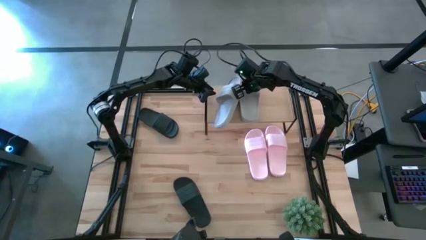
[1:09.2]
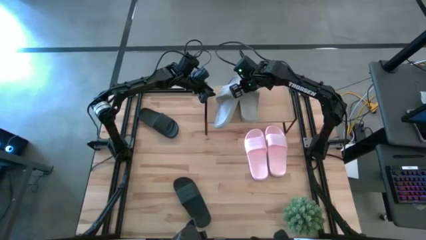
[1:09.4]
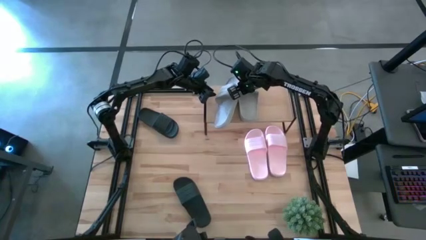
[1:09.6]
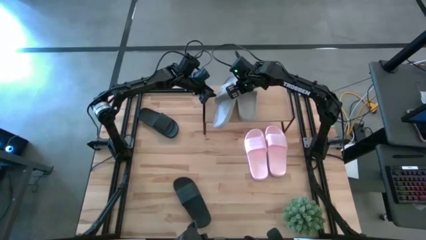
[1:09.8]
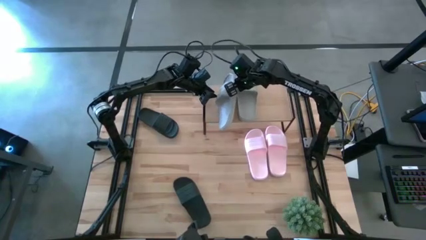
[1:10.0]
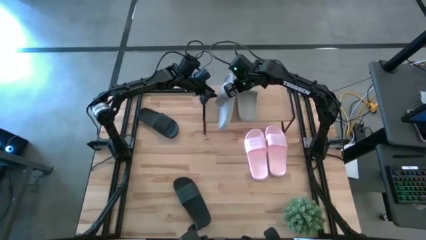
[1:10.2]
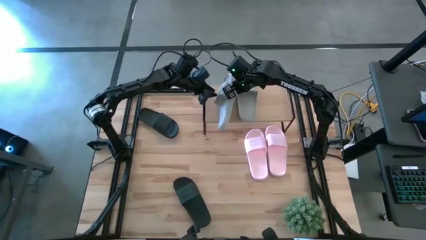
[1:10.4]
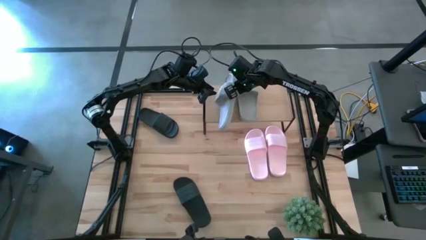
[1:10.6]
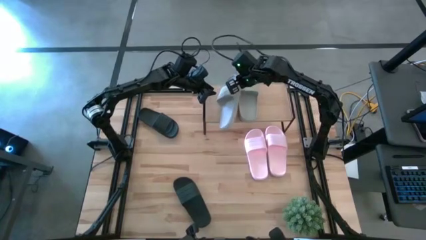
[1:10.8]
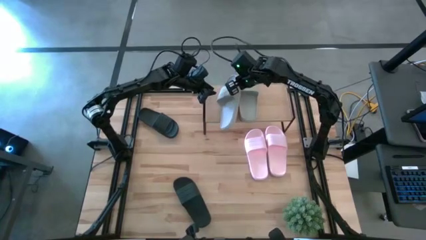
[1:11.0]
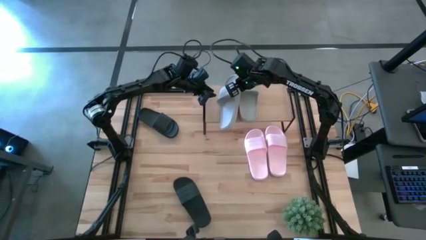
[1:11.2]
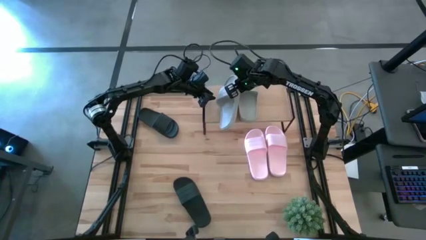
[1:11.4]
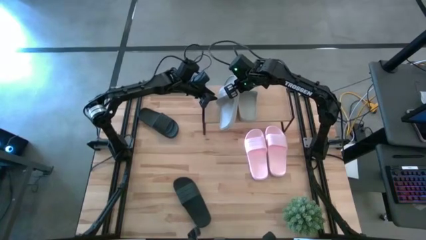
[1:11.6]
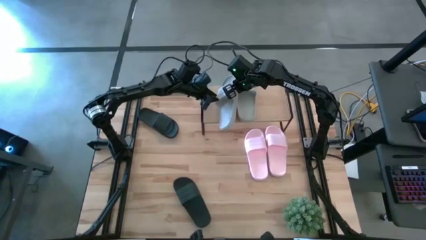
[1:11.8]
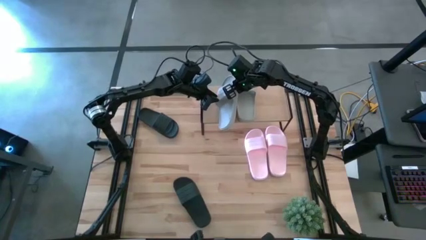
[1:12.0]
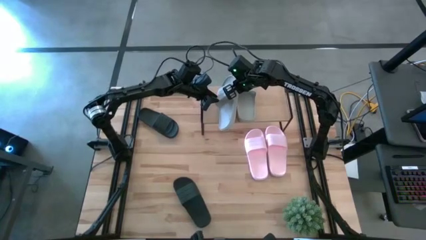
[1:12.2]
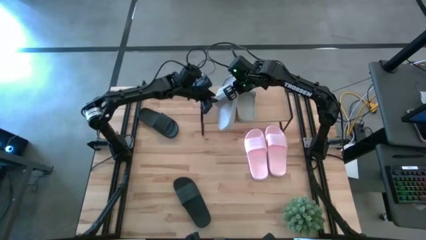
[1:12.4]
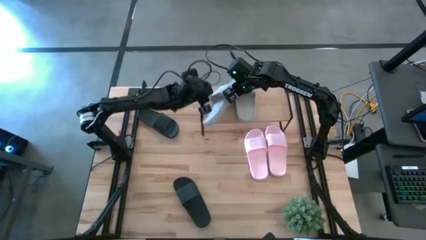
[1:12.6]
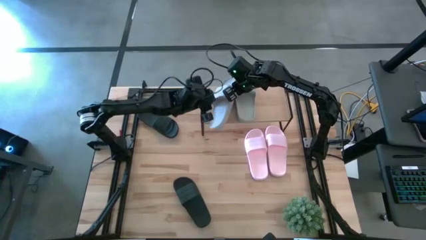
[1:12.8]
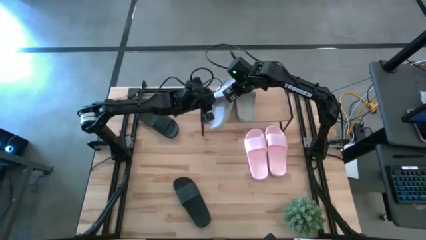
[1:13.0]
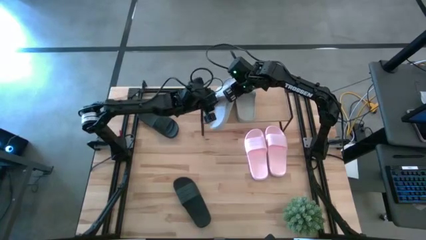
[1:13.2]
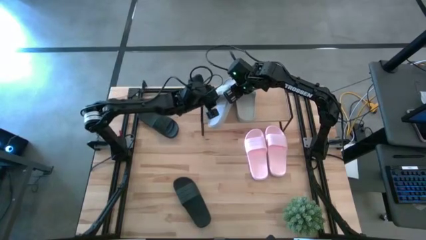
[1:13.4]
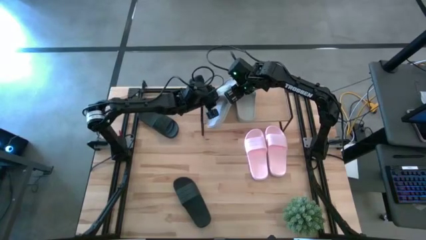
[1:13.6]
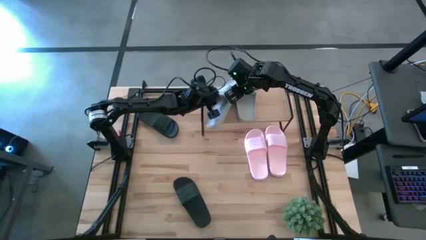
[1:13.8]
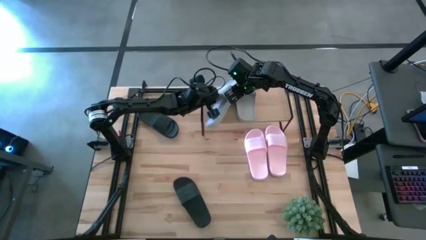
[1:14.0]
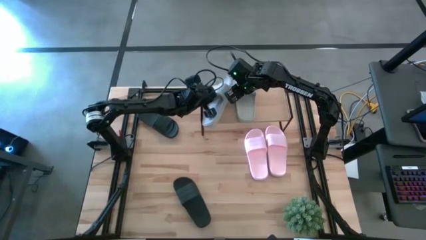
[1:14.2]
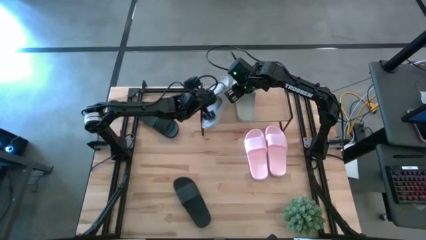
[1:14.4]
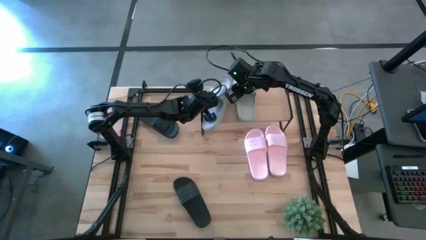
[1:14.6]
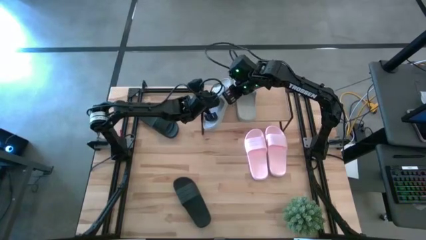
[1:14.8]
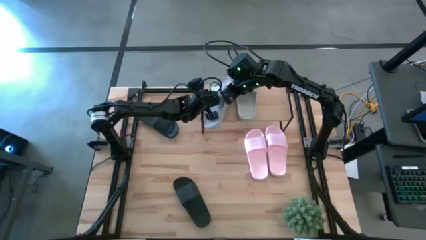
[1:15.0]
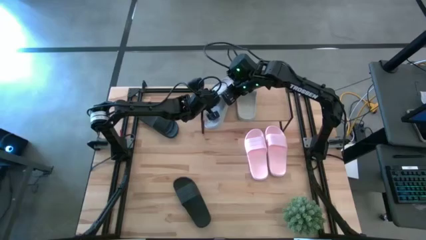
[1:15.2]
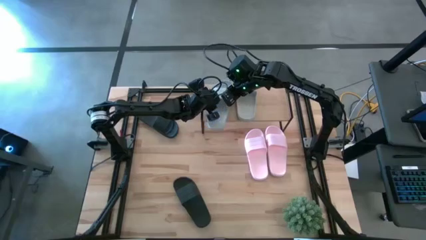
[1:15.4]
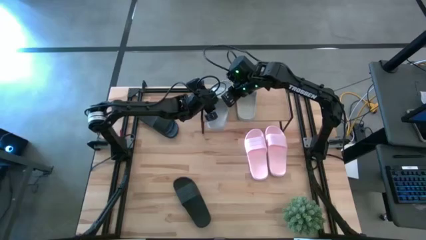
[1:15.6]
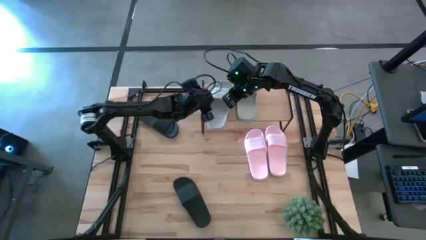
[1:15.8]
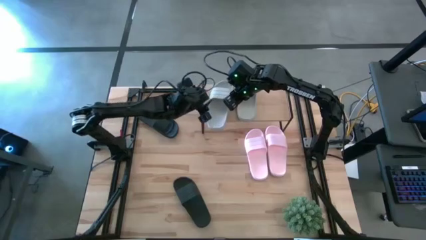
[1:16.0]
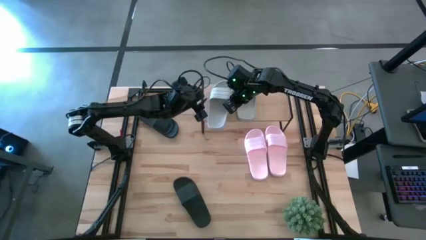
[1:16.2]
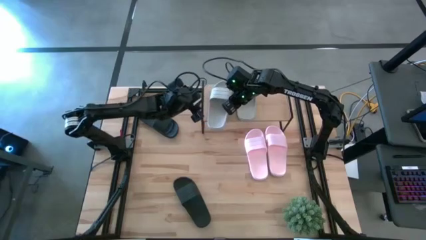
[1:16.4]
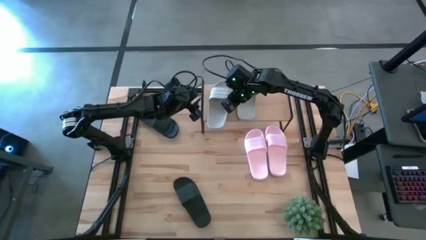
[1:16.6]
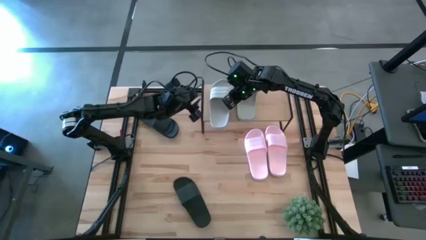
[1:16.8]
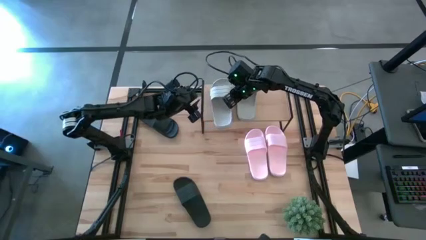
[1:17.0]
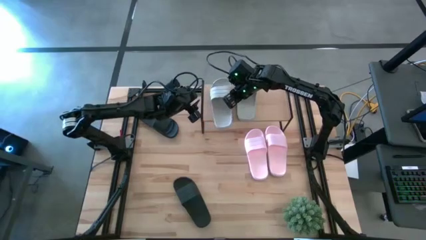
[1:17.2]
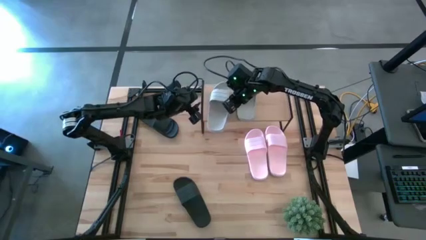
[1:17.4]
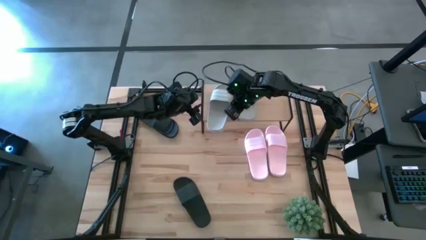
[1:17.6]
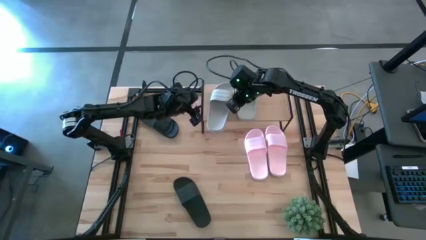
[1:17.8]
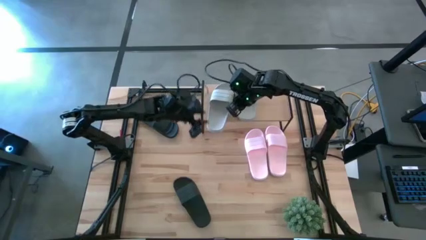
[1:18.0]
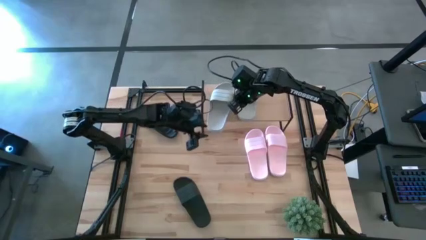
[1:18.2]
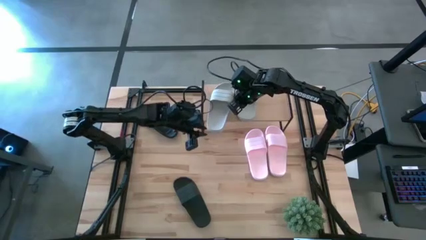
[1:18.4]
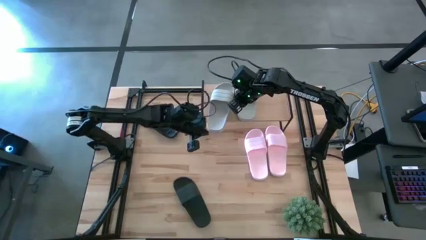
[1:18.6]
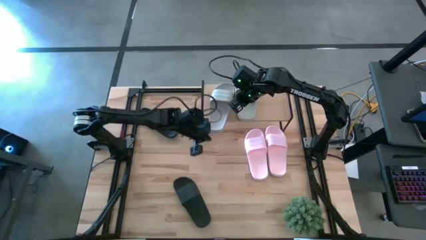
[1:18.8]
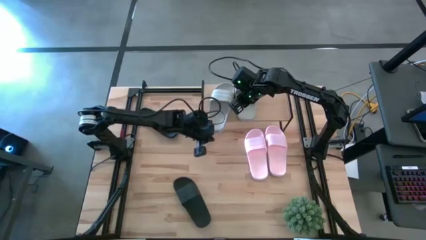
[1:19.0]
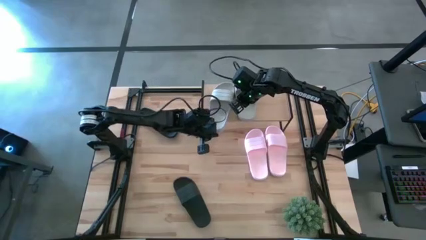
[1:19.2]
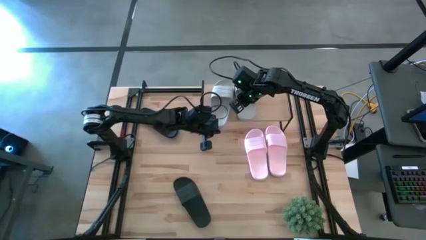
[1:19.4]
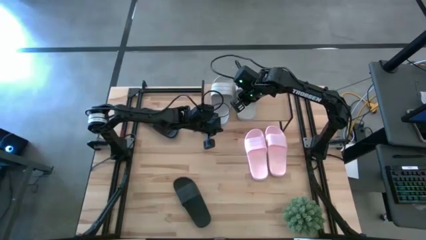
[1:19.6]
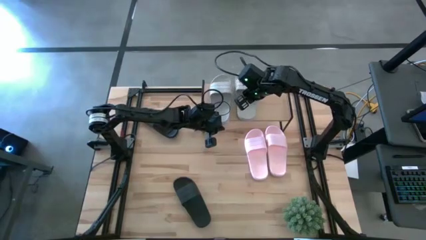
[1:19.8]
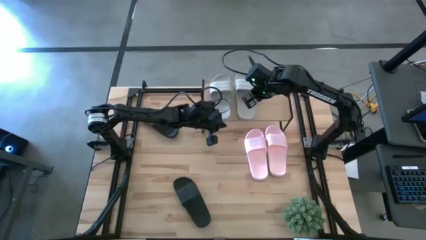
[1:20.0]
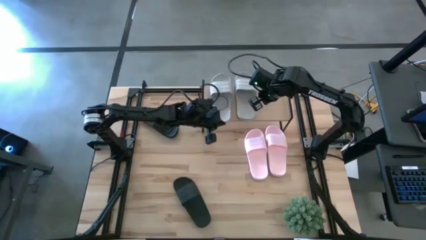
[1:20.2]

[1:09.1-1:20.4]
Task: Pick and place slides into the shelf
Put the gray slide on the shelf

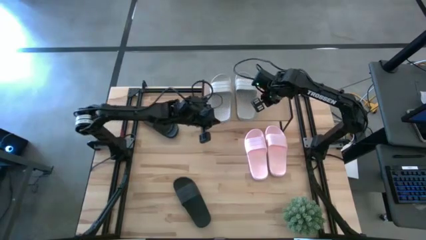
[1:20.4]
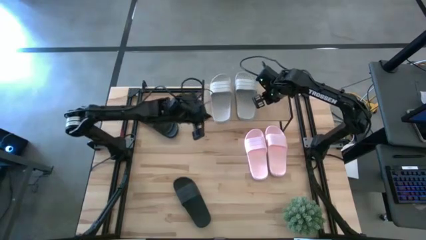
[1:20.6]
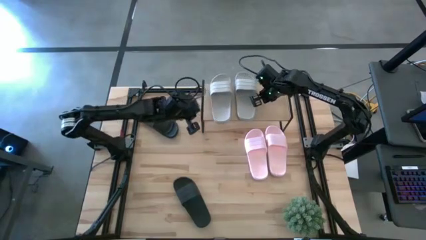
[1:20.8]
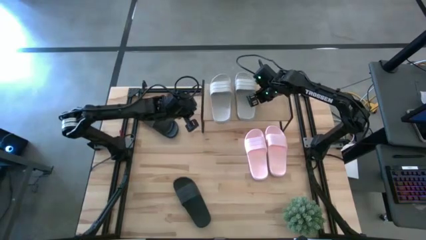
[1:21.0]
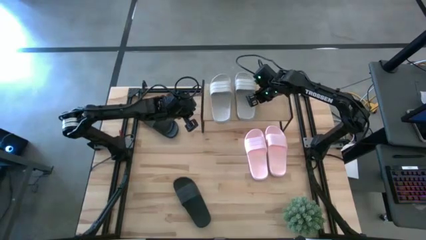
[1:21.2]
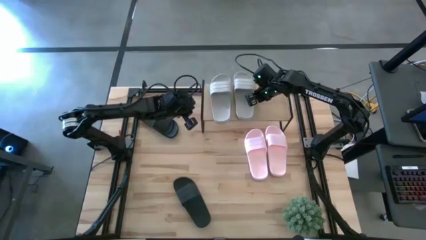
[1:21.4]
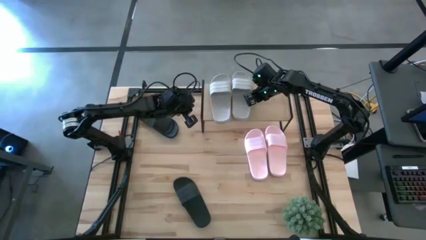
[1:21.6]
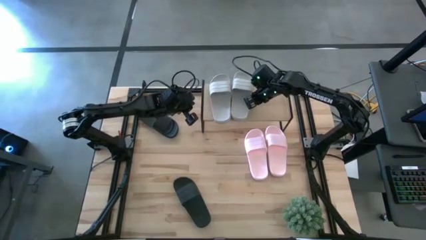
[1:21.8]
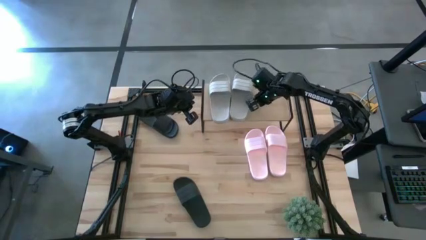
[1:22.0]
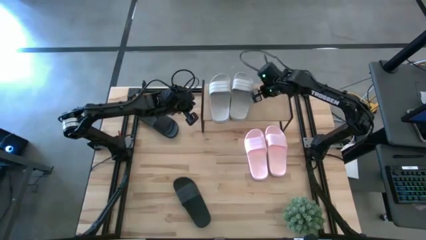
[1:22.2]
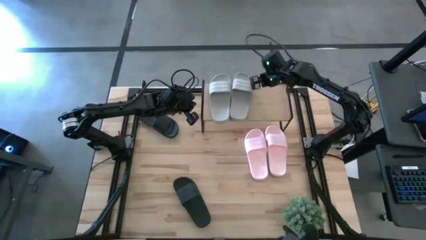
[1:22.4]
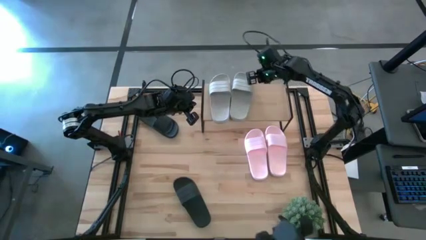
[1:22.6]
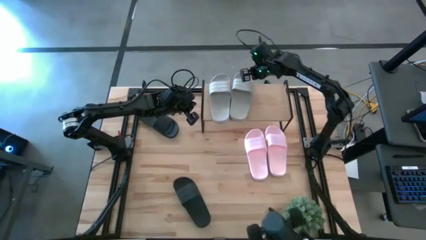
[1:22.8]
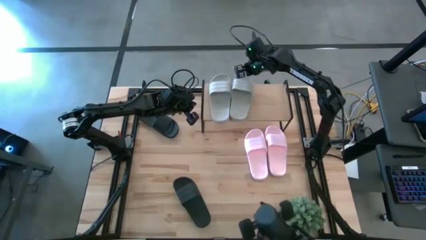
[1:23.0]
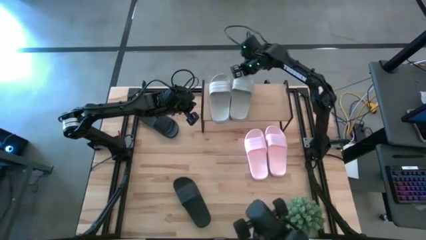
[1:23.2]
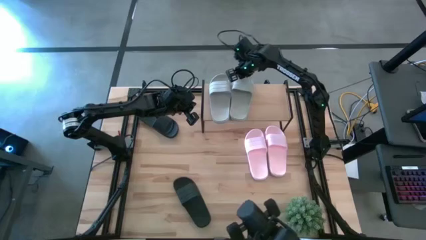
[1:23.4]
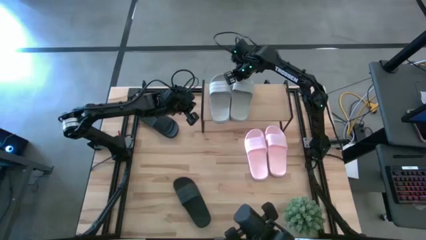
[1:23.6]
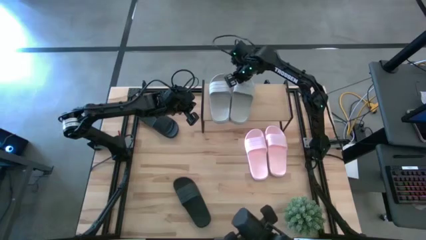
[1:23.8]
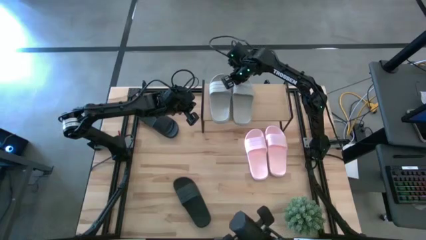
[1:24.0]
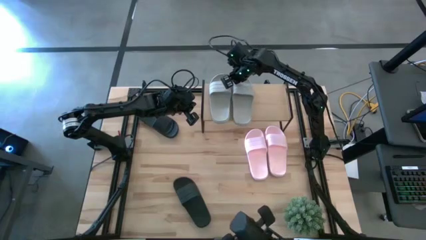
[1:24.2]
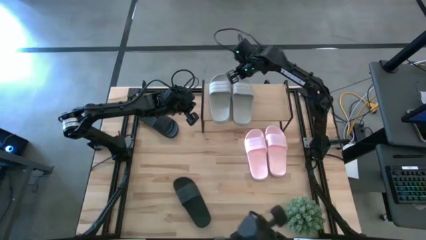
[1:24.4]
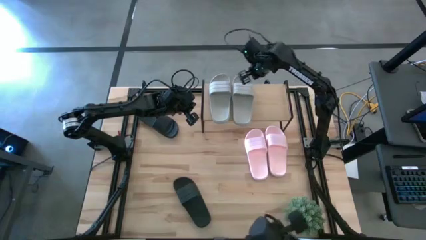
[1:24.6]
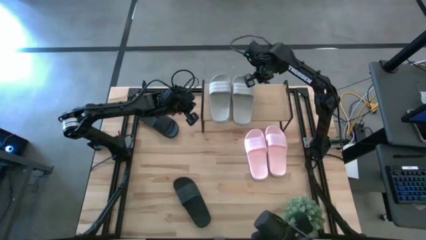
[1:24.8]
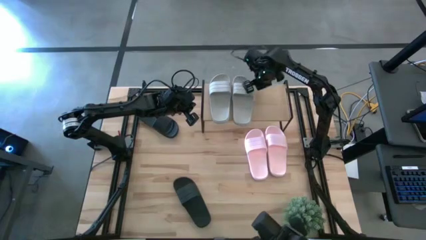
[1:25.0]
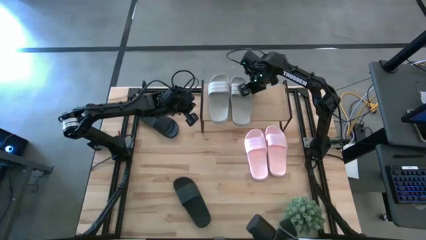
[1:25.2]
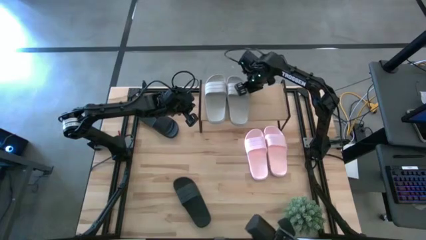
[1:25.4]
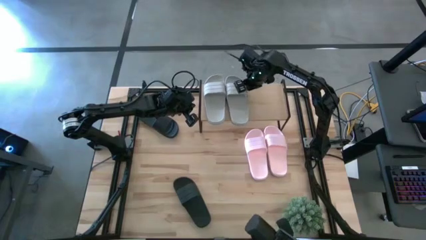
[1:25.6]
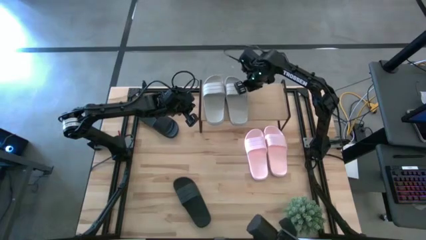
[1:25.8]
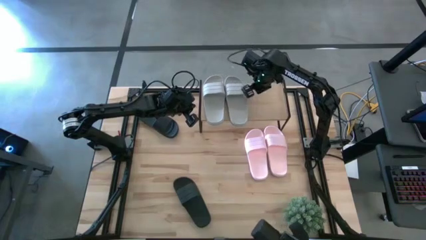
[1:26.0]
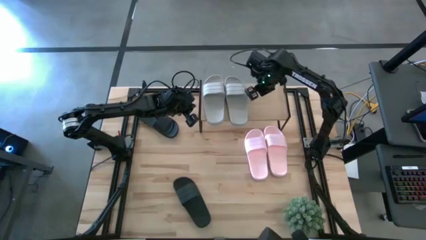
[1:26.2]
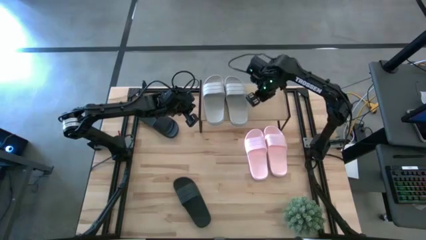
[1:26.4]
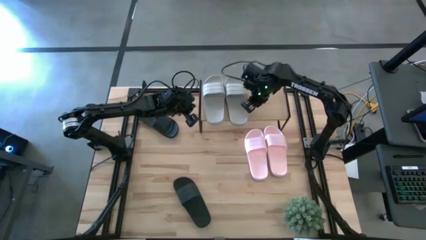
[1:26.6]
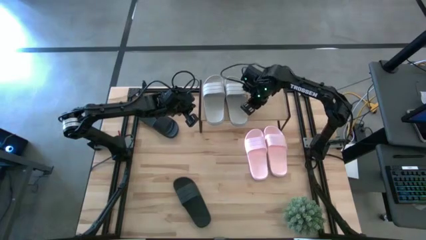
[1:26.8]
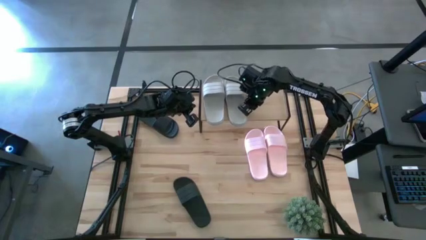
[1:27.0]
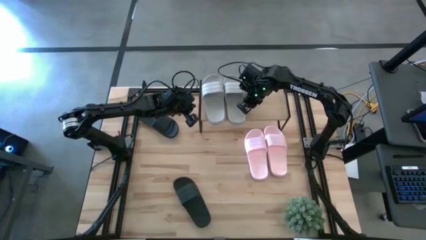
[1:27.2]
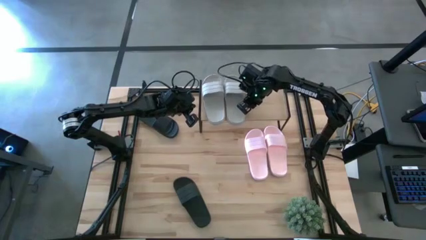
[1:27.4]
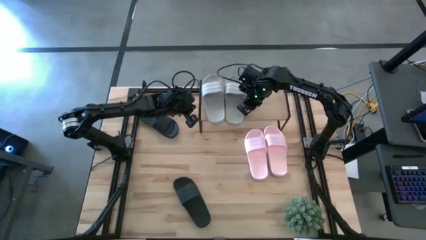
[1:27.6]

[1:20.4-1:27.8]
Adjust the gray slide on the shelf
